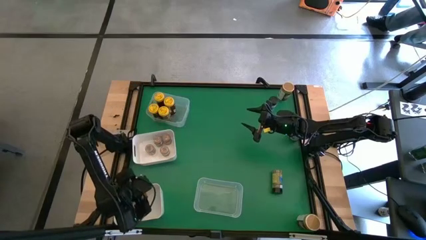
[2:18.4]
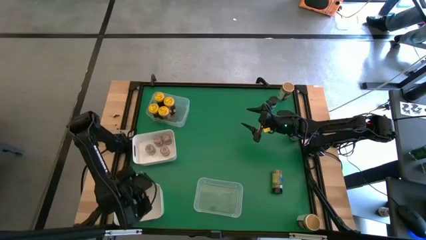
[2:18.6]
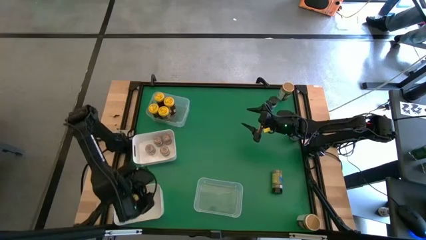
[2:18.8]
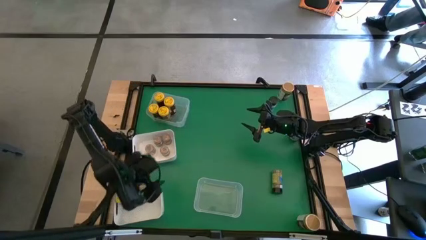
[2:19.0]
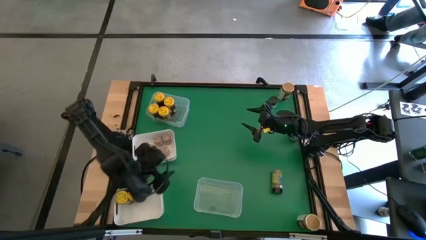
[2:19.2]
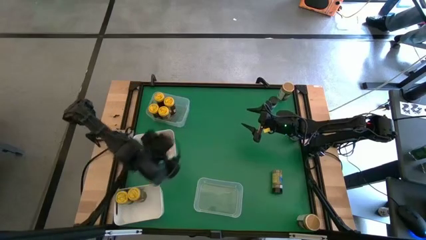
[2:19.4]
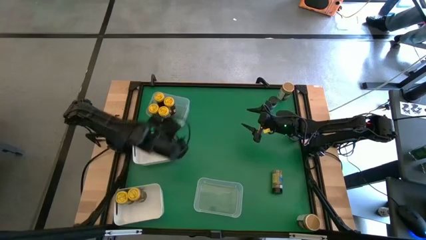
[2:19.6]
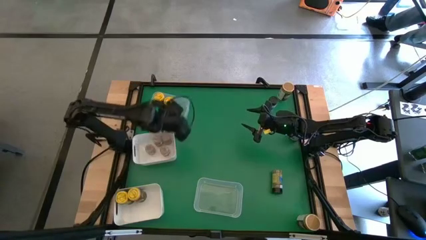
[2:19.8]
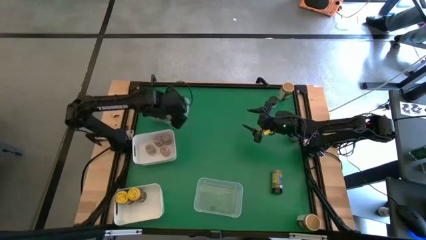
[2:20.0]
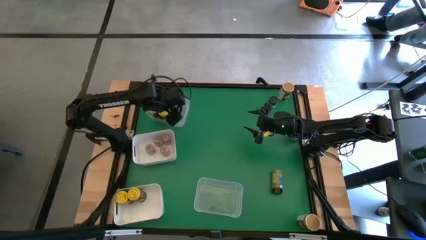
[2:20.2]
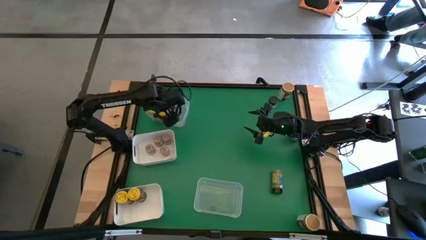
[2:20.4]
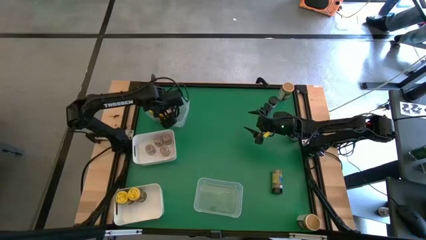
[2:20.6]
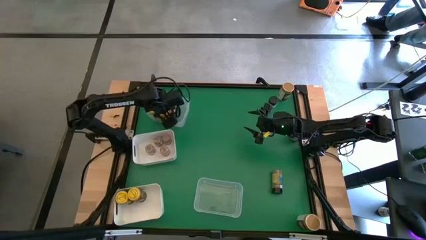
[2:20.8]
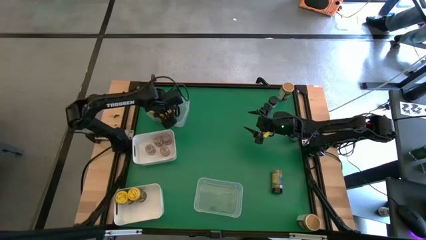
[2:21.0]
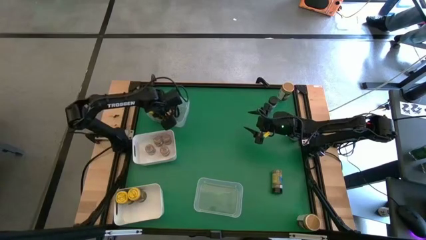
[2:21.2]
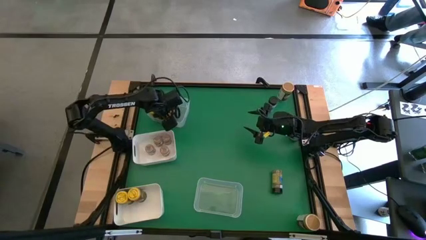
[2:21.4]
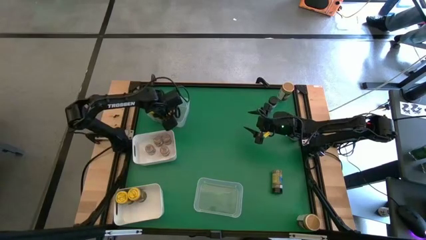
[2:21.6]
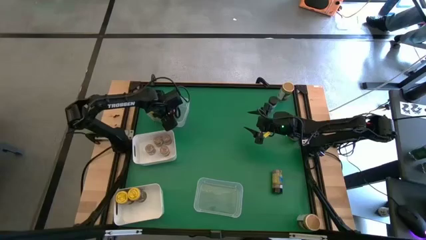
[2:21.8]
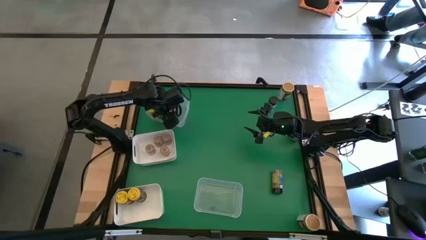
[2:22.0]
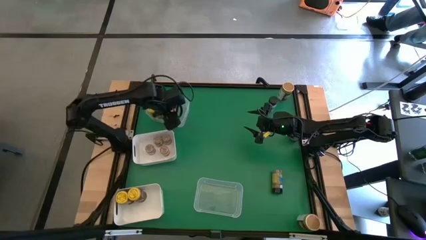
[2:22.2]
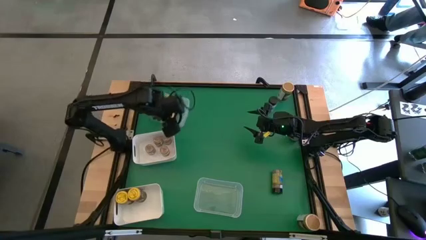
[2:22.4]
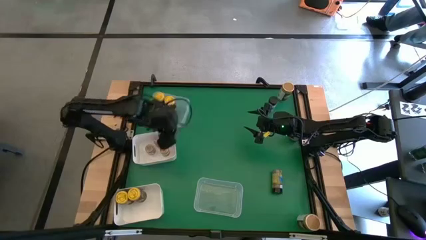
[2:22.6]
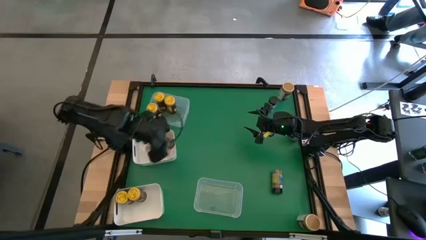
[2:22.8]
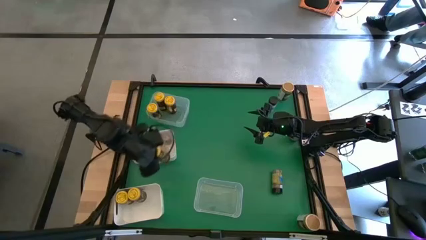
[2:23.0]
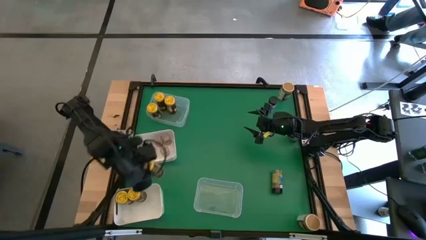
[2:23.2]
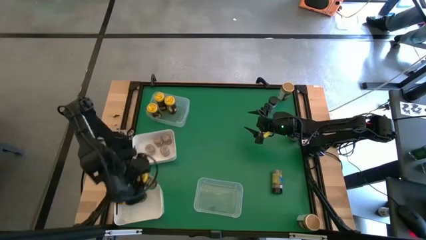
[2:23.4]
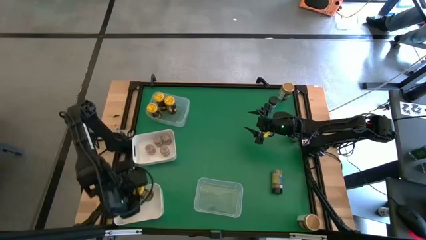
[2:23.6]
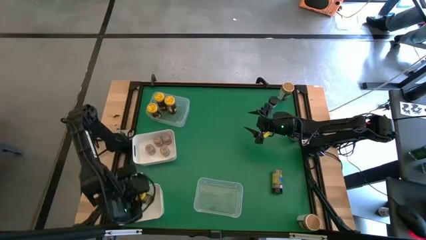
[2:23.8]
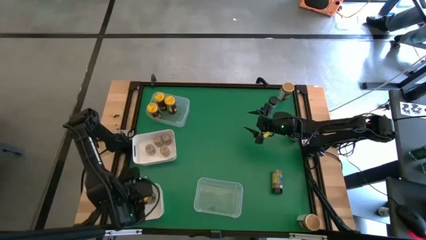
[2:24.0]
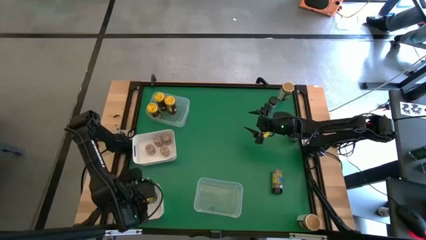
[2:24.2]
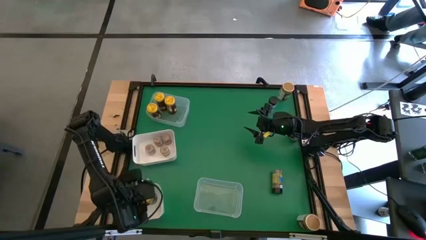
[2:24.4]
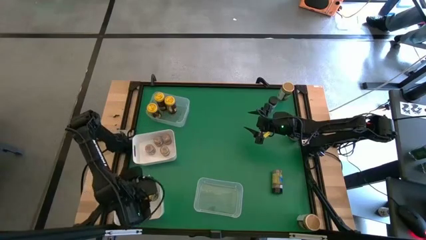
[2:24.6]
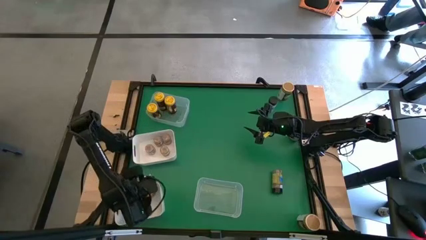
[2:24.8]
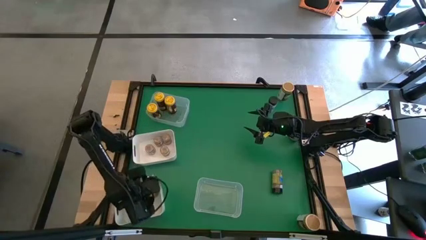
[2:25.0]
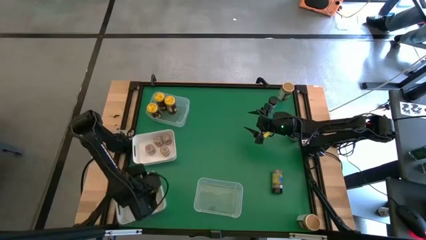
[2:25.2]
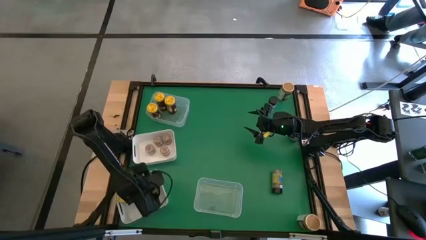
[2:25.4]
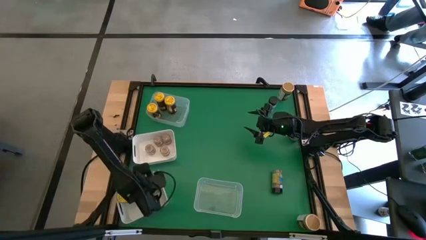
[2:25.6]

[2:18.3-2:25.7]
Task: Sort spices by type
Put the yellow spice bottle from the top transparent bin into the bottom white bin

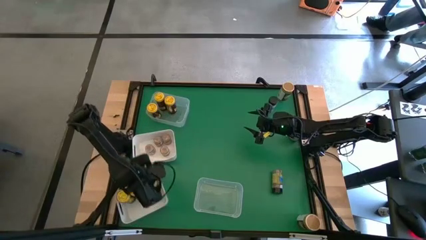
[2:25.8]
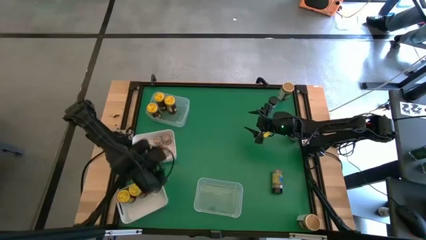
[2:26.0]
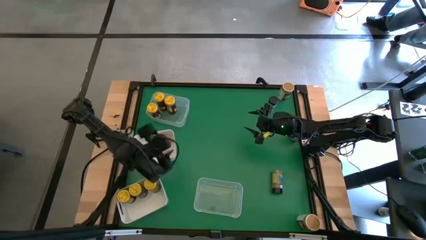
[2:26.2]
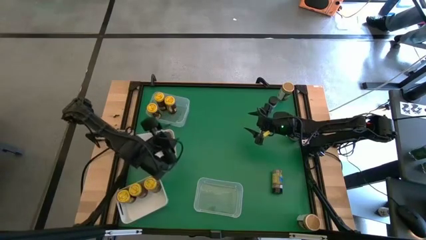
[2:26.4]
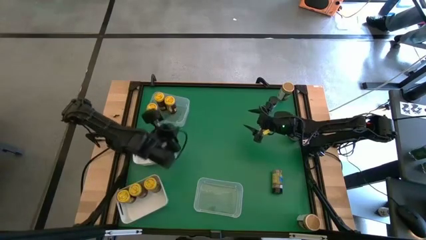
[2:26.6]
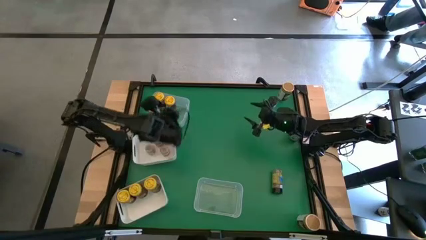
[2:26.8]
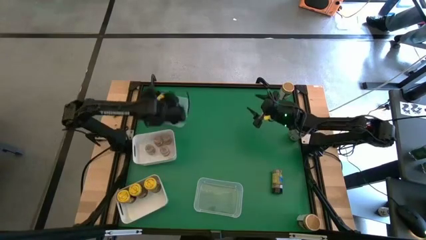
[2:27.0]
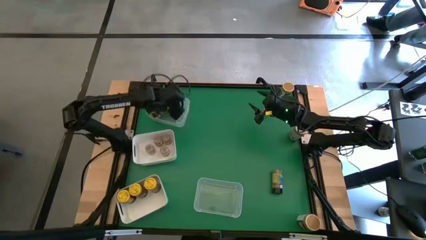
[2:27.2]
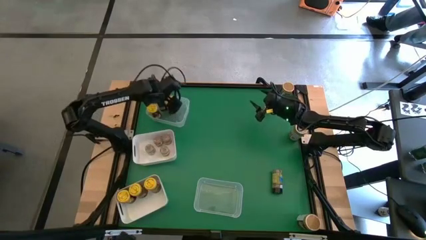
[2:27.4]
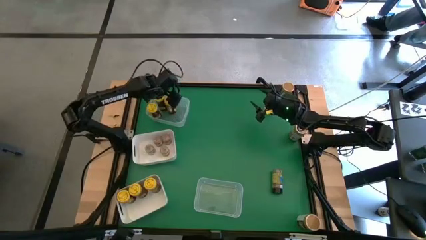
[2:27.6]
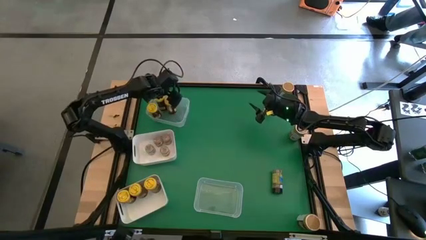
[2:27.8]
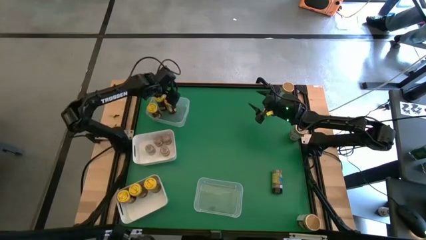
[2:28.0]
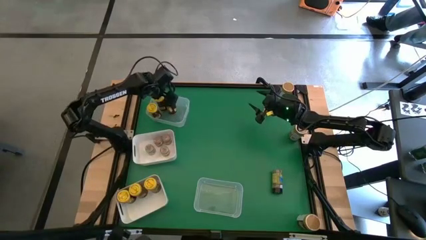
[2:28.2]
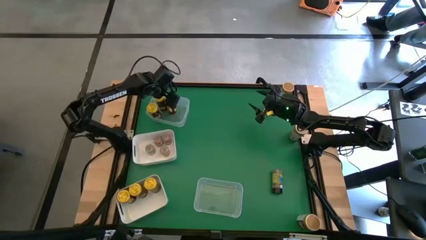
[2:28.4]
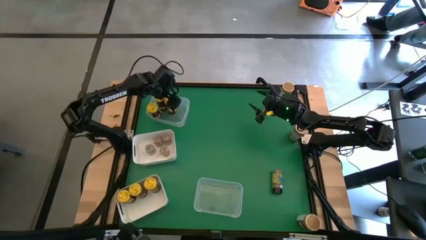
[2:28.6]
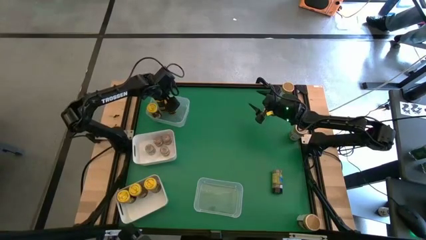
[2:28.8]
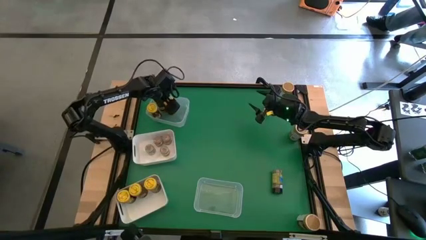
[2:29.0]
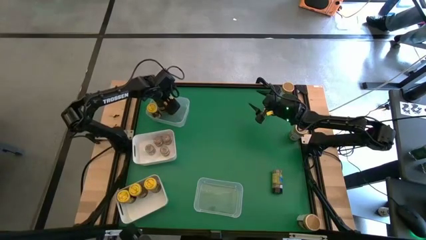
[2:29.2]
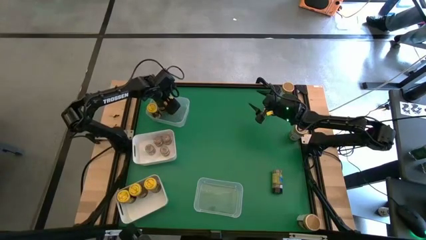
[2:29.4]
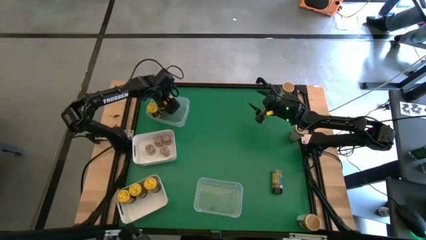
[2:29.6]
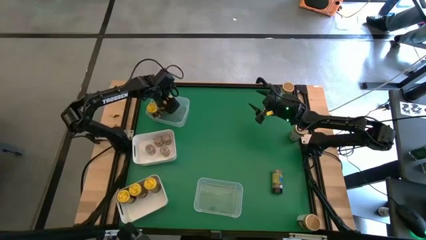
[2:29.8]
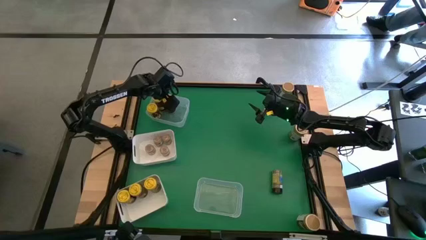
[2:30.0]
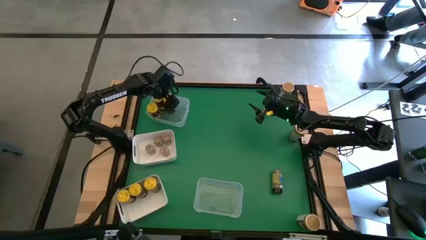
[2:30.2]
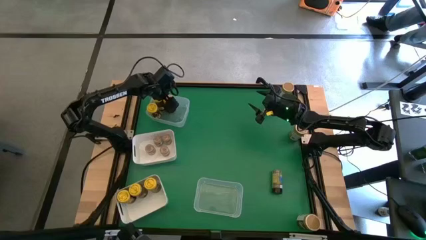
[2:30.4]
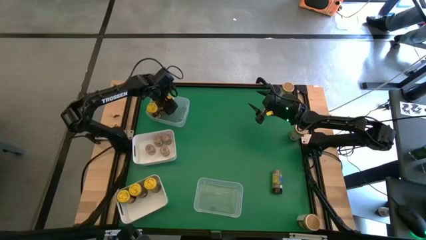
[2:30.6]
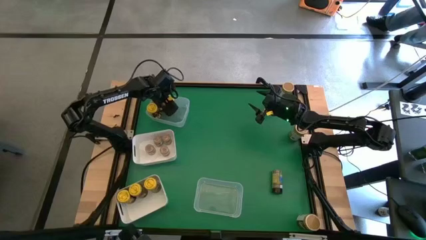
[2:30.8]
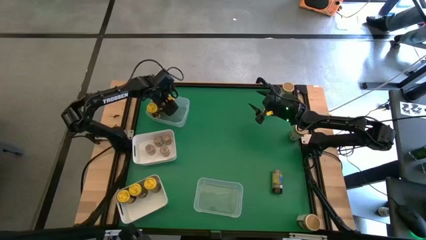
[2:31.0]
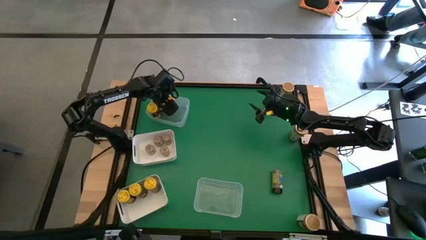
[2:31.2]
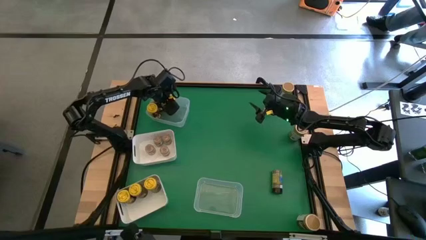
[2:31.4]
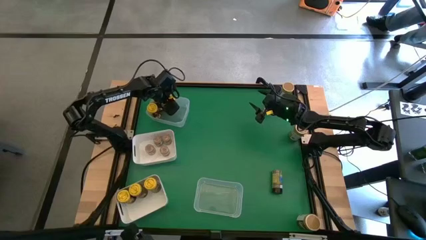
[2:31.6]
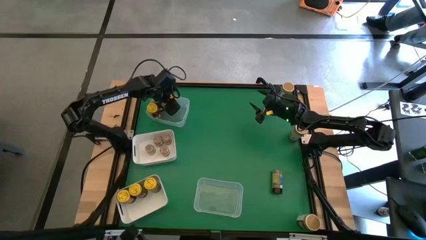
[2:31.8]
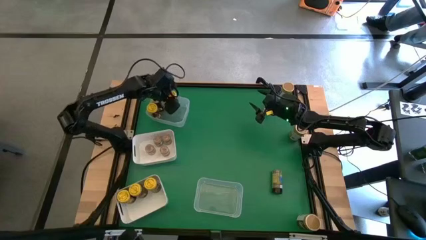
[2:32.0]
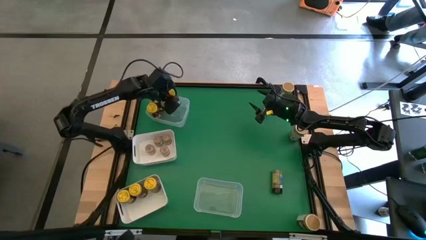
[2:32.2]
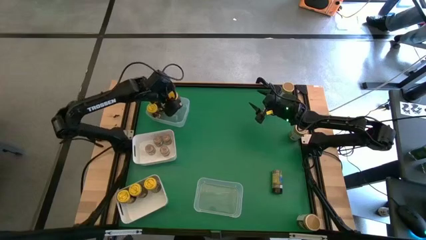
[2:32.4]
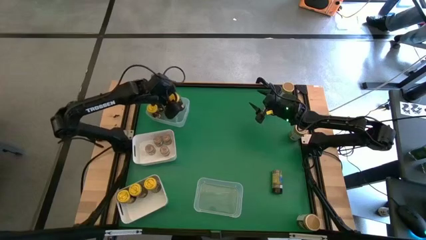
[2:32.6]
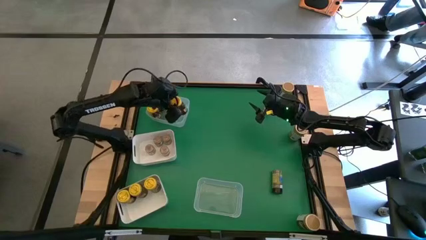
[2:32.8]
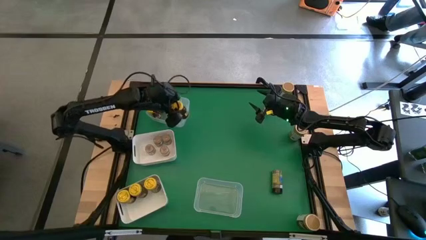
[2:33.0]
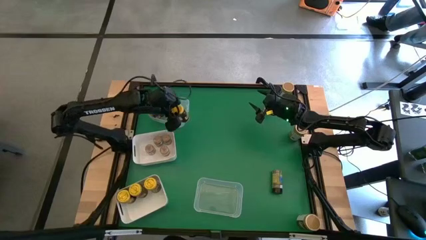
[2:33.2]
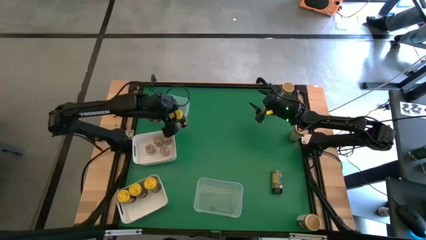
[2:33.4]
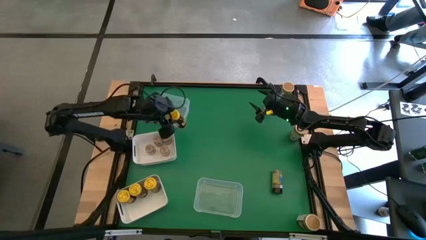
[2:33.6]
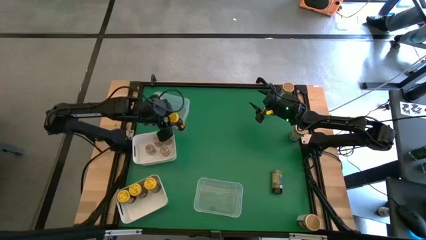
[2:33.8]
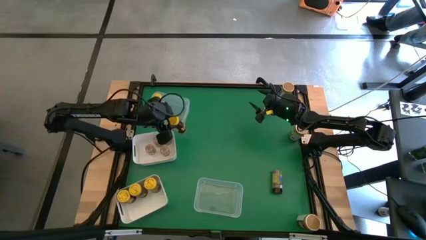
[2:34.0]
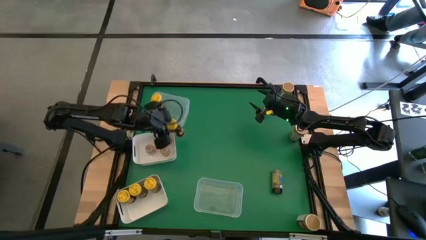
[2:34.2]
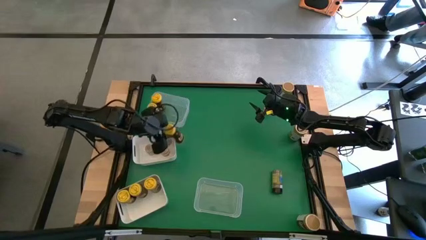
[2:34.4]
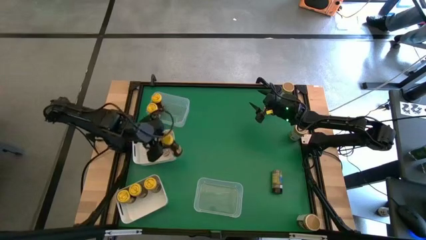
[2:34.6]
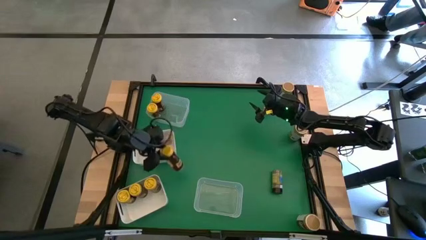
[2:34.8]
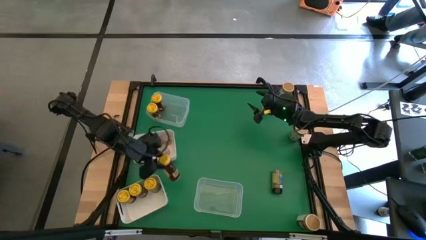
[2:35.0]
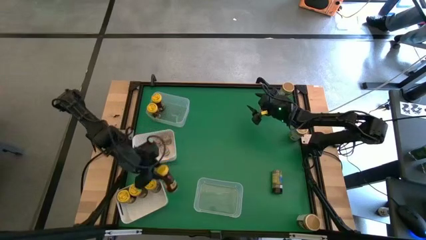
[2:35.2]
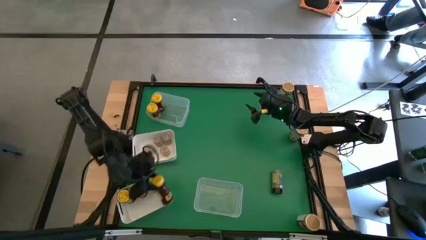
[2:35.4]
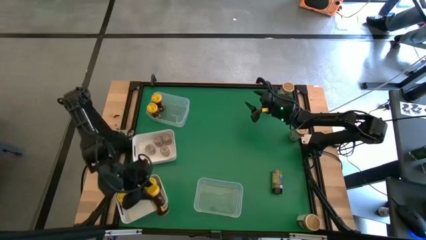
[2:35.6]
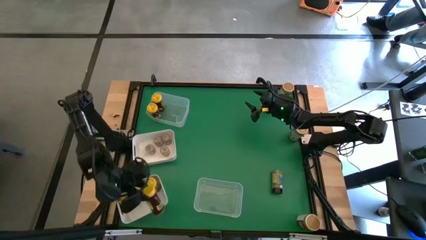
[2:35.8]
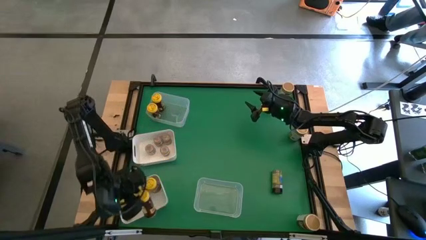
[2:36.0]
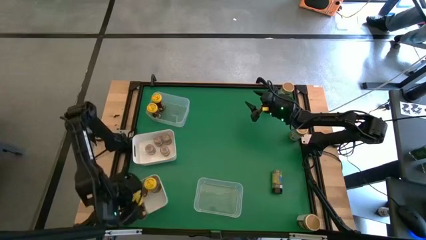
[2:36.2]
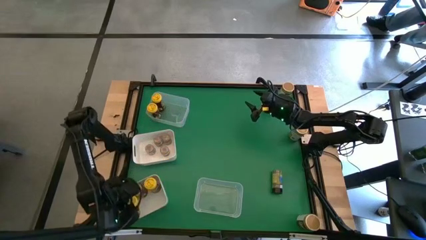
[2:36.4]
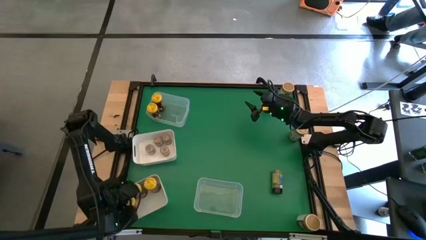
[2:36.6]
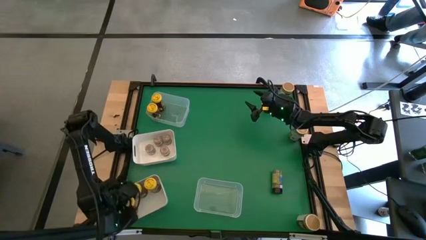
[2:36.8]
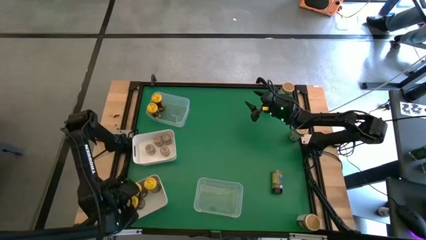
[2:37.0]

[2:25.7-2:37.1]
Put the yellow spice bottle from the top transparent bin into the bottom white bin
